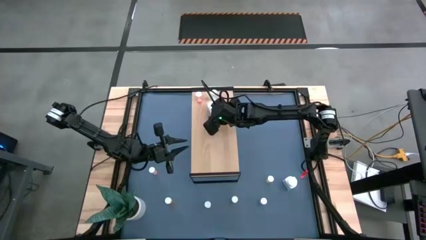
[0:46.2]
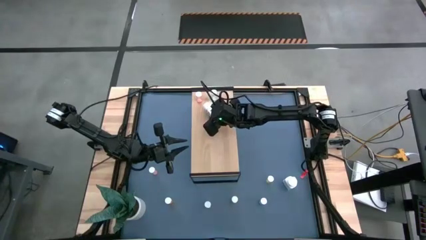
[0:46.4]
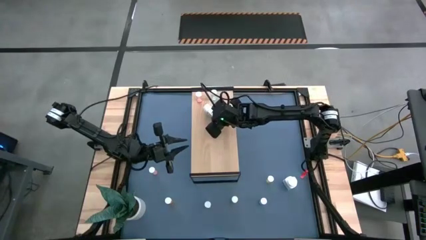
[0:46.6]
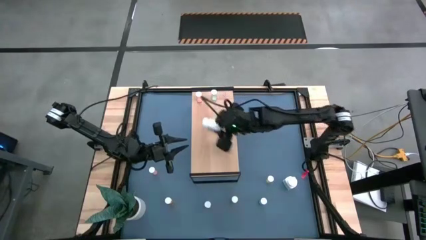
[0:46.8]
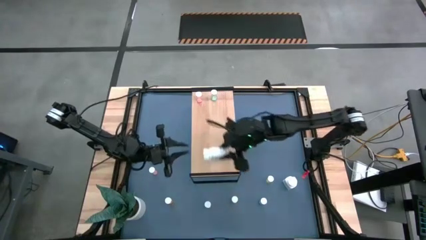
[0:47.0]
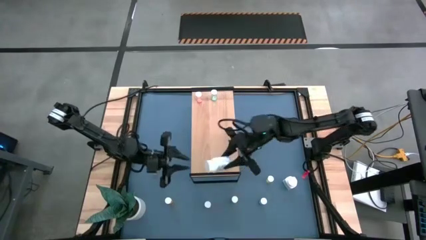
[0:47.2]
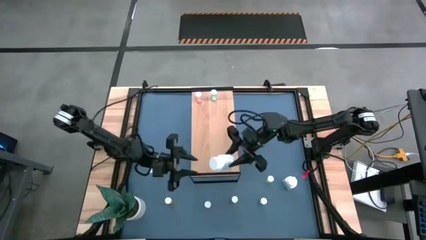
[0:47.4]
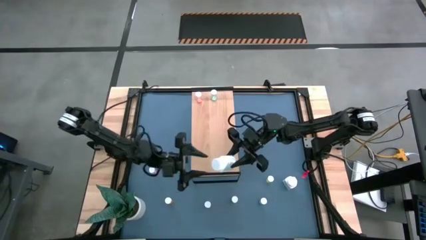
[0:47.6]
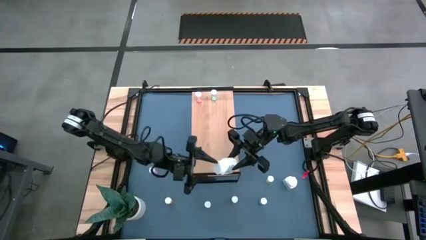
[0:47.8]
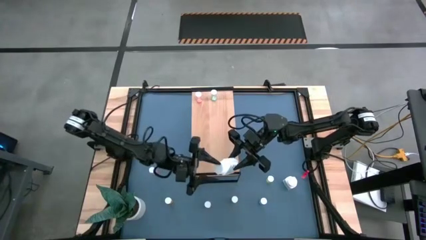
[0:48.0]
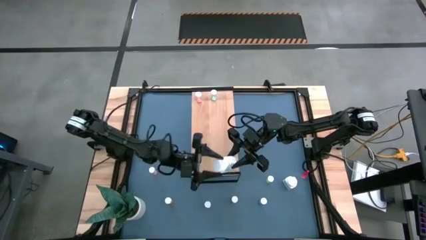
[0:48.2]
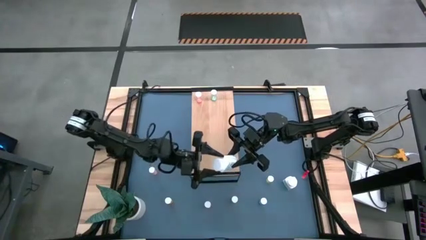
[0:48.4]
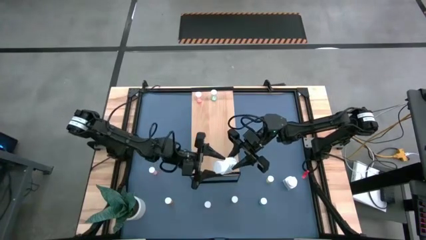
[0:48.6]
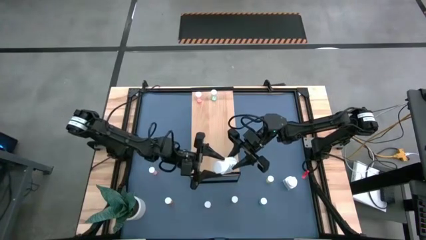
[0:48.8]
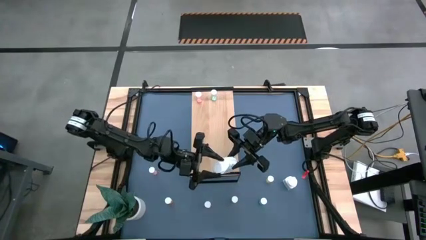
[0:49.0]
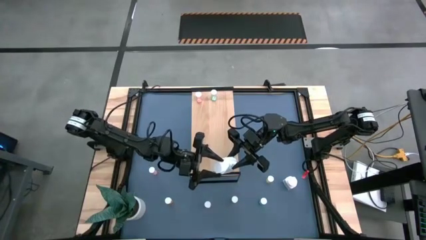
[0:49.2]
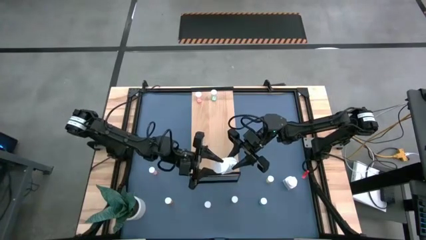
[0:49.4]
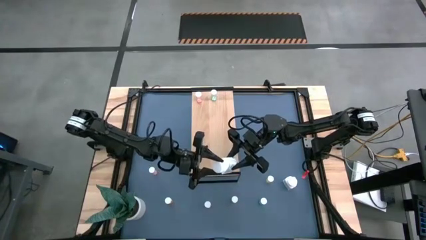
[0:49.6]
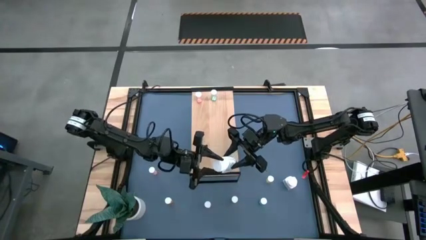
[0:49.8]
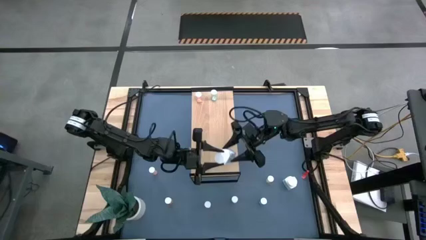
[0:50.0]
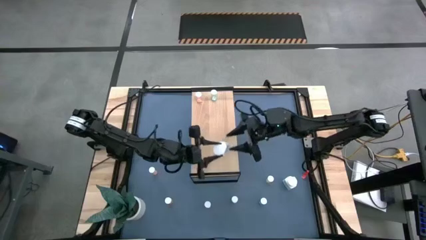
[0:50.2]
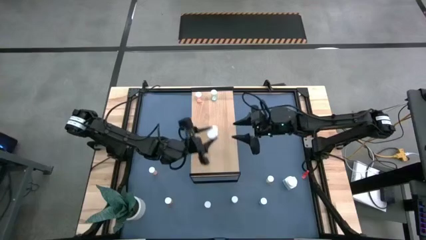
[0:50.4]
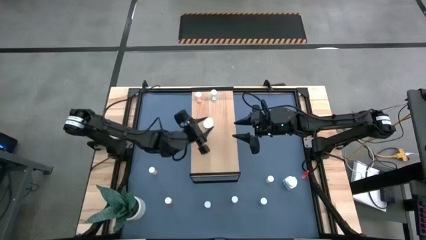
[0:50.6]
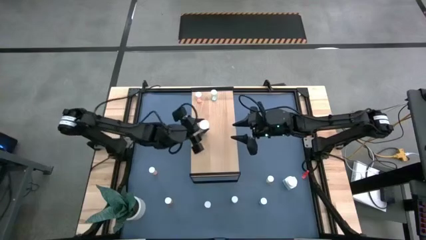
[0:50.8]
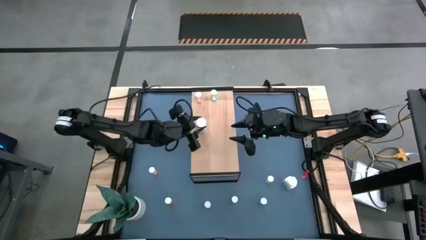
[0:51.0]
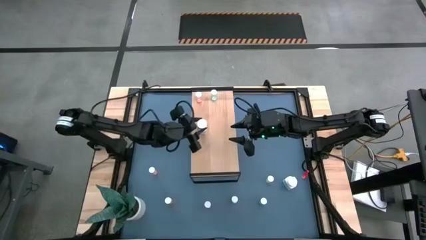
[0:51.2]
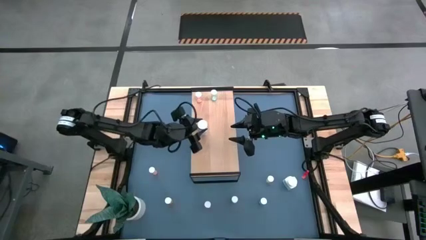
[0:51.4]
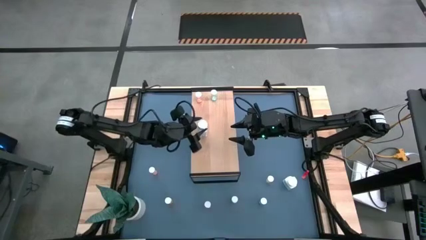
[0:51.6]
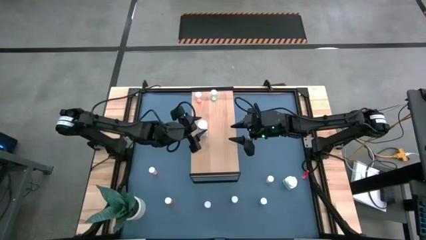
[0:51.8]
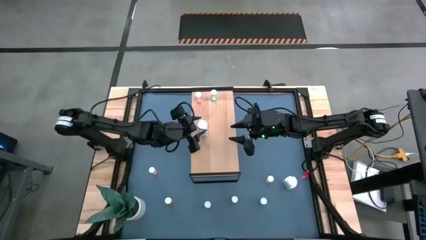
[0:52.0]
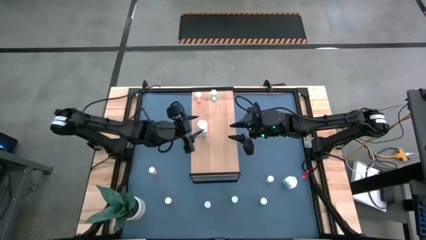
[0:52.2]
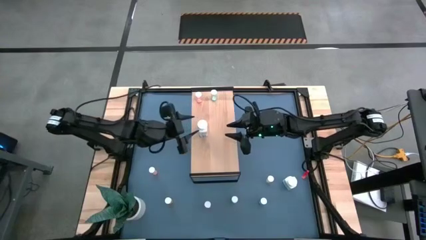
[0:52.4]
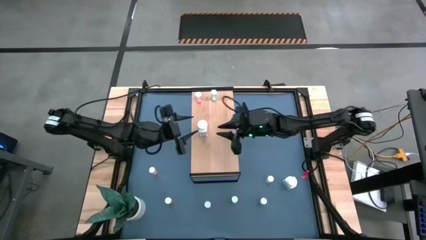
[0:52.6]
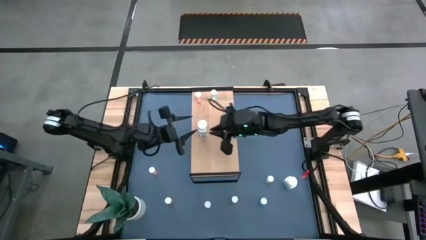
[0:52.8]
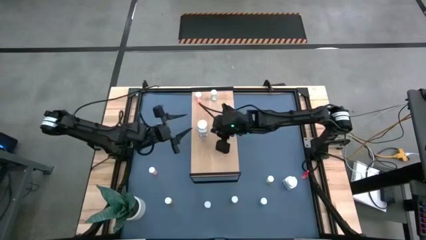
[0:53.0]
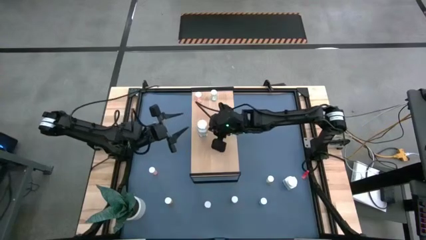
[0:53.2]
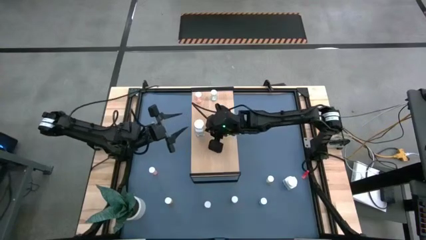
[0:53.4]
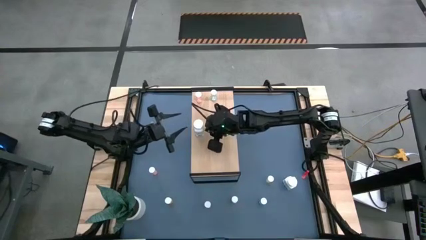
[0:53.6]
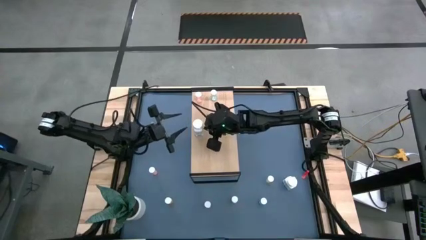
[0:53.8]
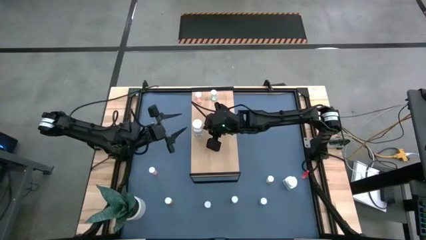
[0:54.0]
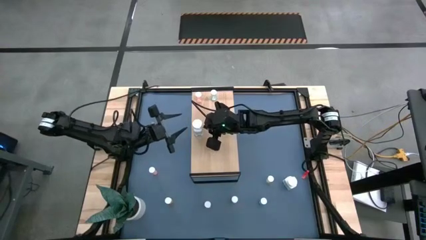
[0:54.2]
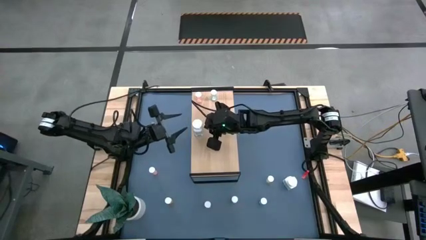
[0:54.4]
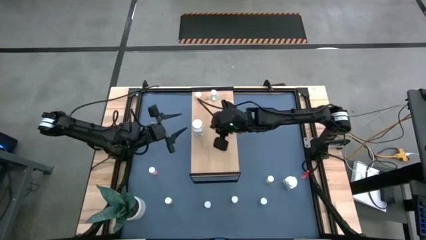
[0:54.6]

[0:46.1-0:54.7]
Task: Pick and place medicine bottles onto shelf by color
Put the white medicine bottle on the shelf

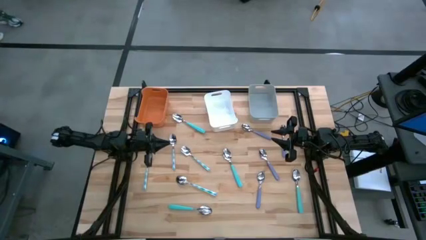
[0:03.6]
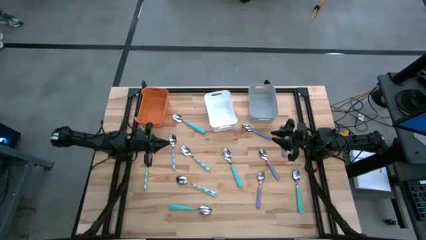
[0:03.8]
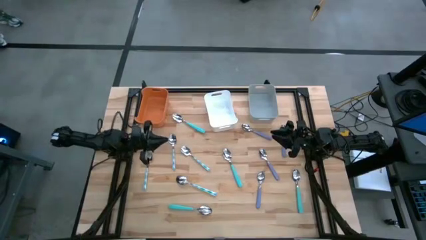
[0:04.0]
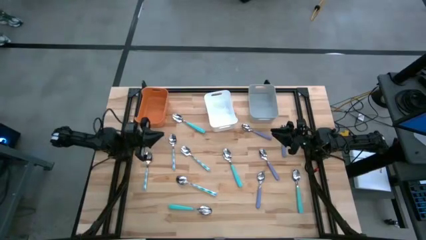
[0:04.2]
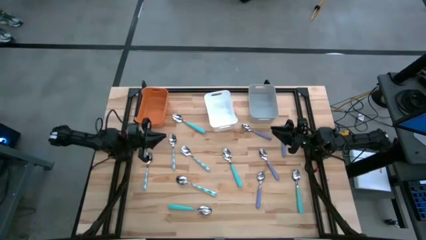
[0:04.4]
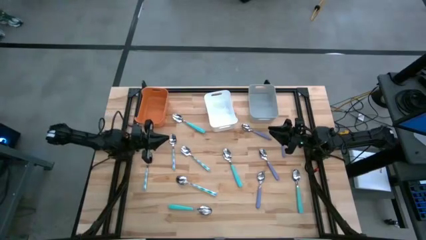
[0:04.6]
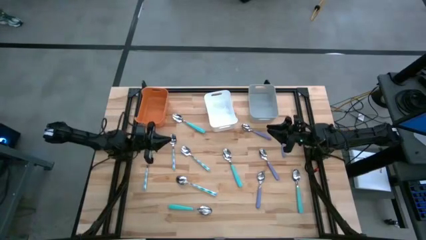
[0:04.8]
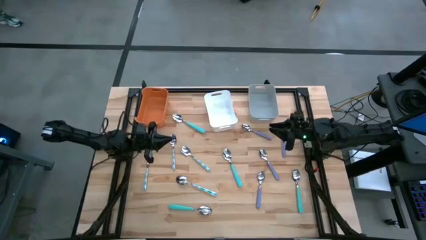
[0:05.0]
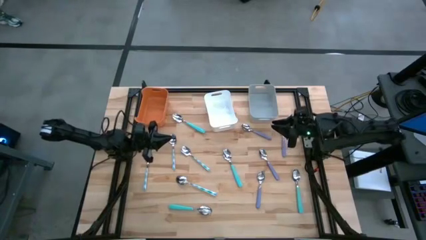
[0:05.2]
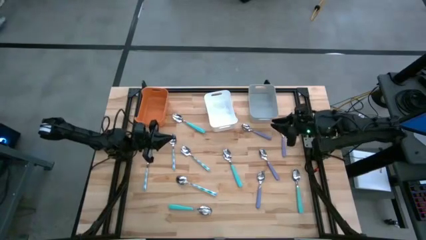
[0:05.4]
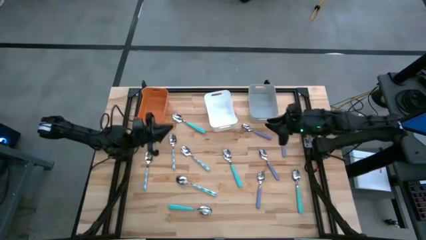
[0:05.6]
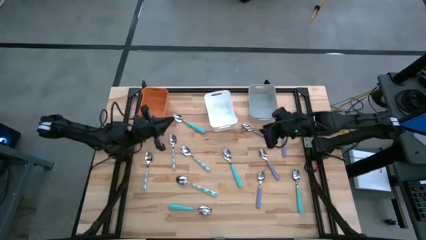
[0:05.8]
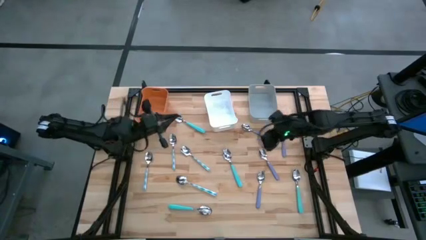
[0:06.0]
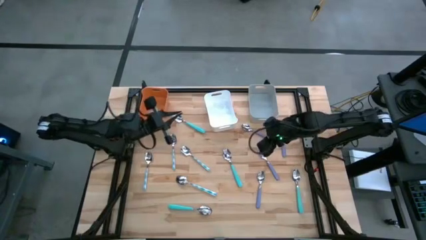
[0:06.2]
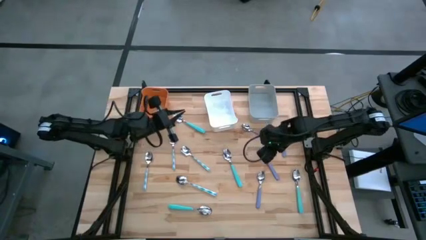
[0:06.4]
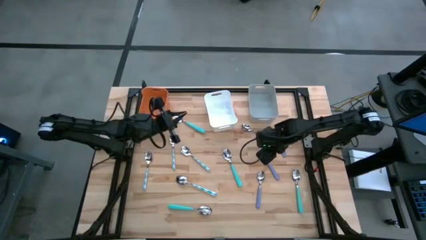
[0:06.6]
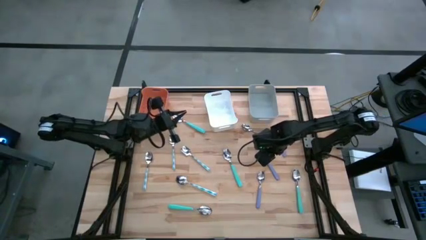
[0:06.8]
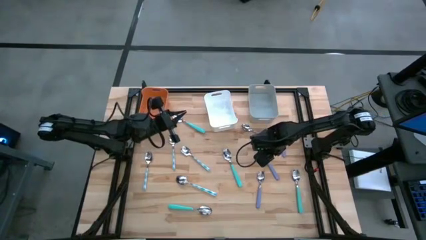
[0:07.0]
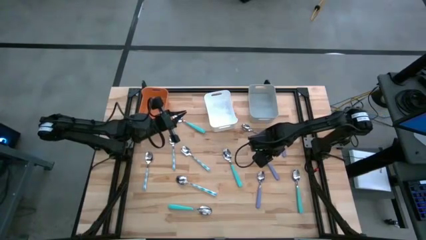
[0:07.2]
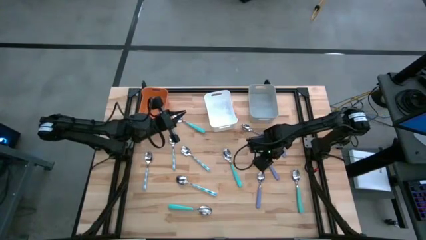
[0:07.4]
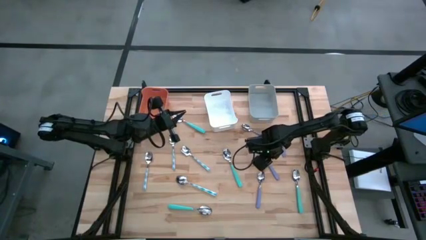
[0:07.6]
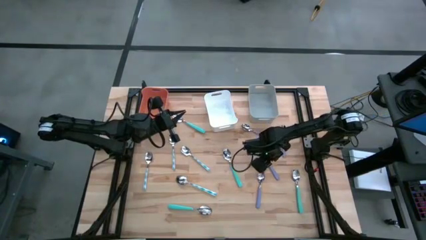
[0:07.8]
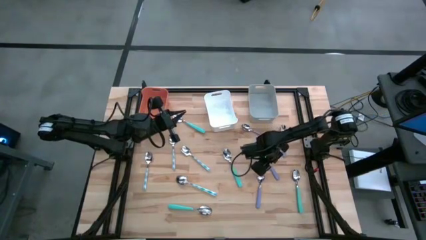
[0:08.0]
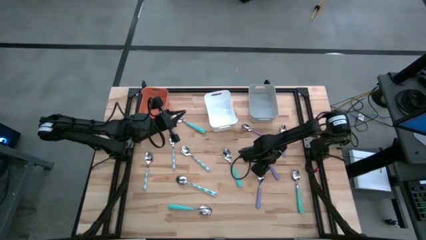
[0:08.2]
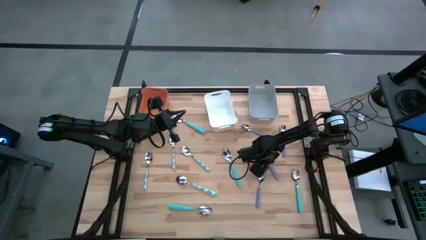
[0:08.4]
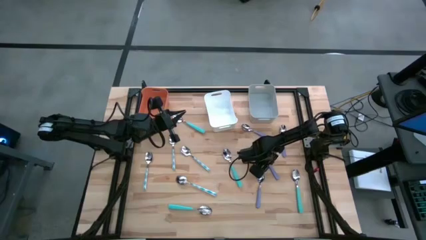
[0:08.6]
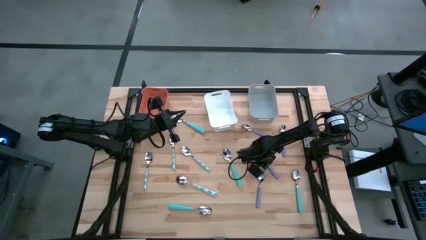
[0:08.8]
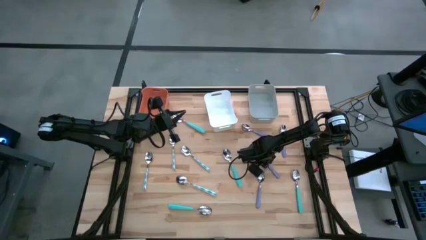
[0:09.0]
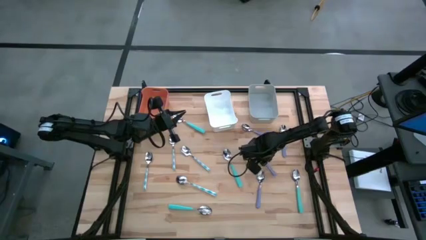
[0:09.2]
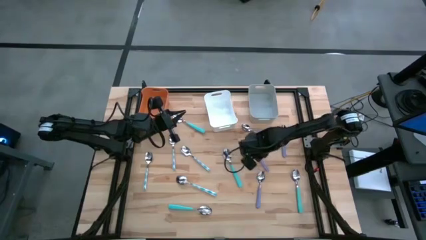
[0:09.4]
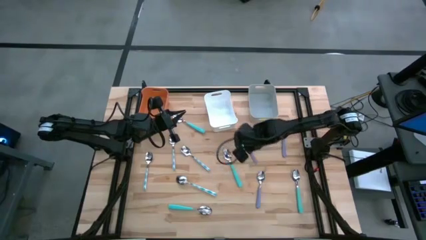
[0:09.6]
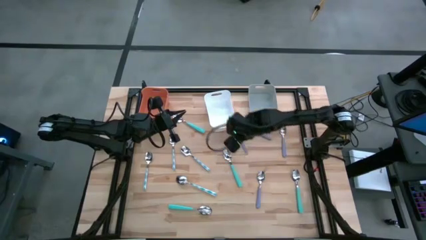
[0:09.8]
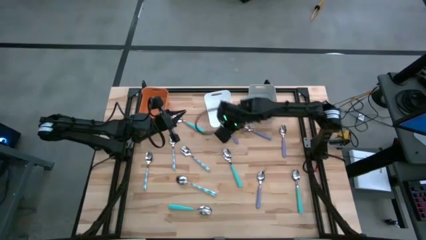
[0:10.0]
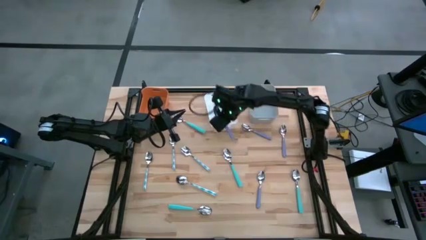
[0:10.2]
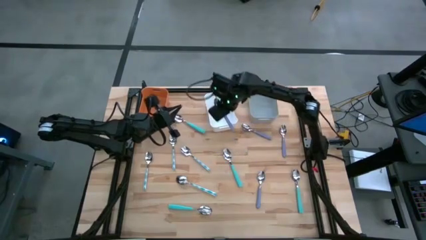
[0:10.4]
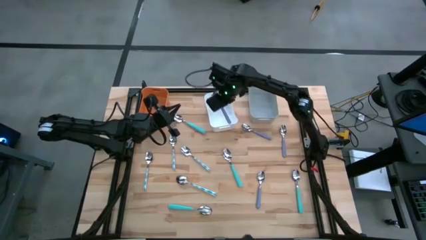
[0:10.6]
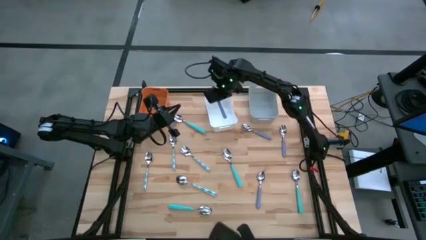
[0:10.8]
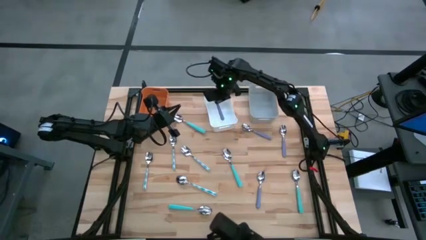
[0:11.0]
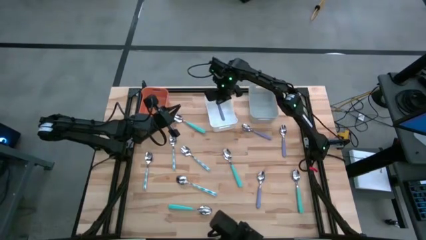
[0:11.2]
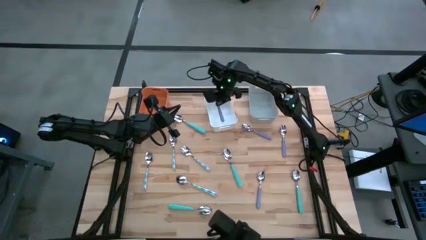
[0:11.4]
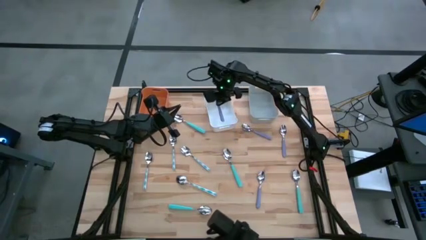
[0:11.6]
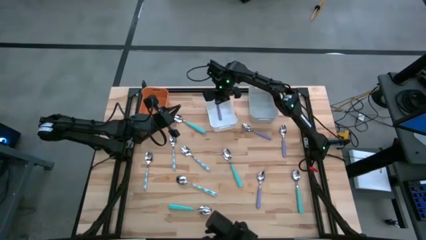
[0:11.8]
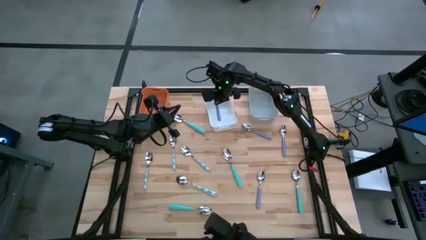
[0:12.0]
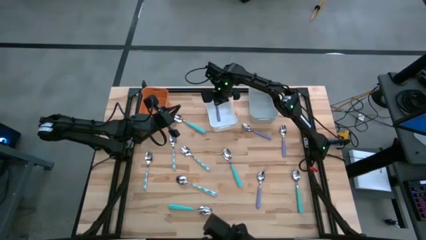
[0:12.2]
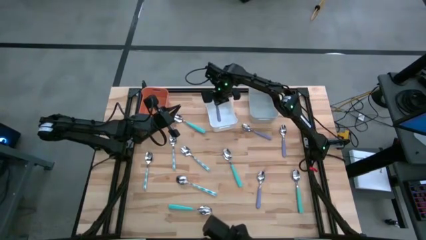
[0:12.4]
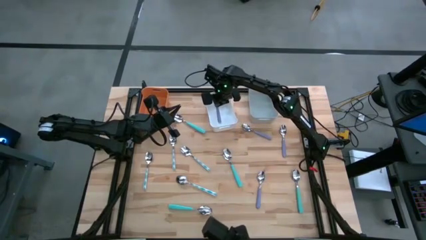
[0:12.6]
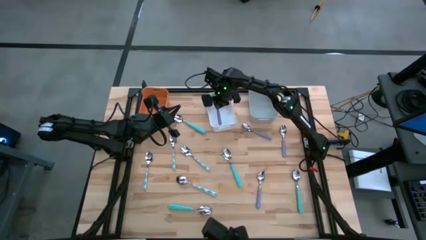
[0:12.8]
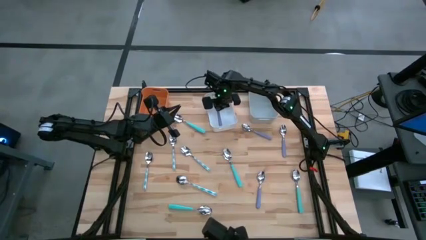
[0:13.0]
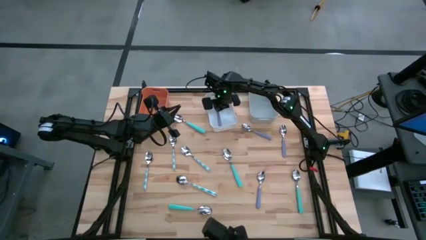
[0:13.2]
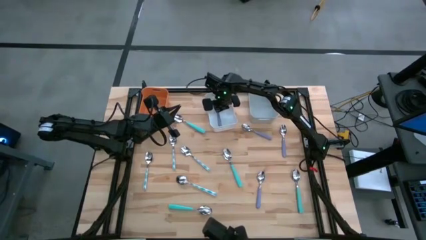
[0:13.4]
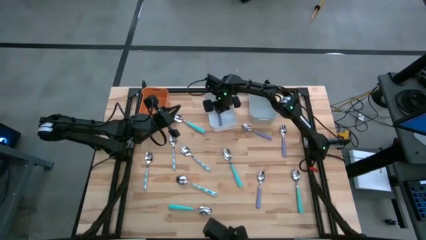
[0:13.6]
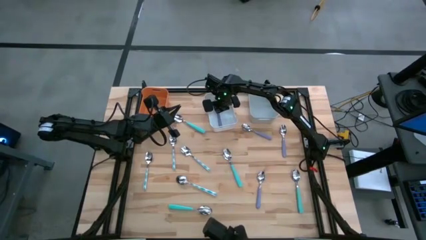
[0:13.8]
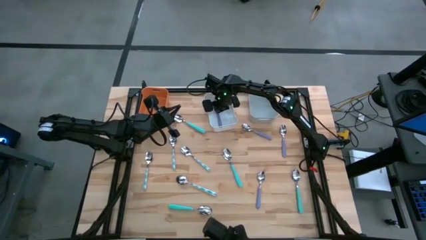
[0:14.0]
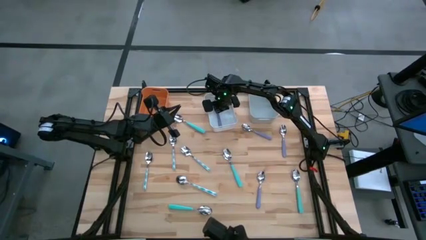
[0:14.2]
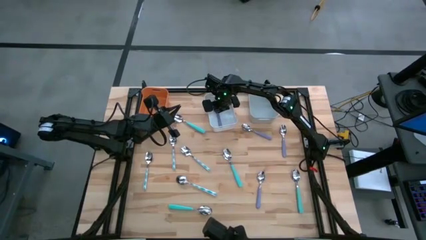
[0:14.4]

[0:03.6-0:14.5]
Task: Sort silverware by color (type)
Put the purple spoon into the white bin
